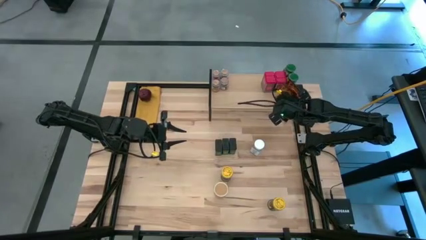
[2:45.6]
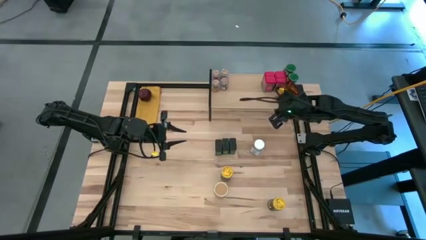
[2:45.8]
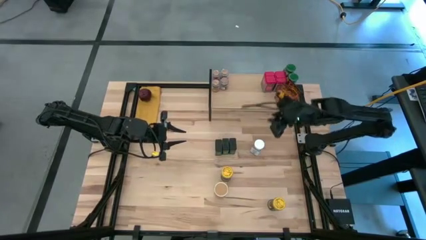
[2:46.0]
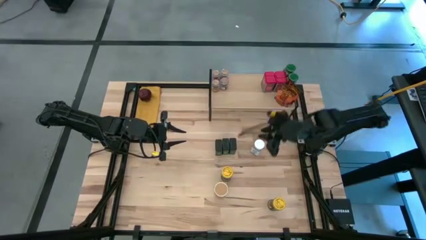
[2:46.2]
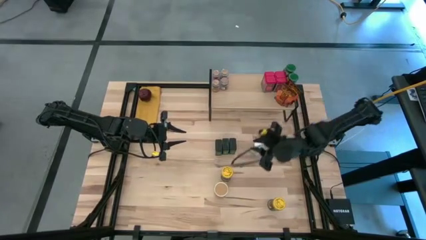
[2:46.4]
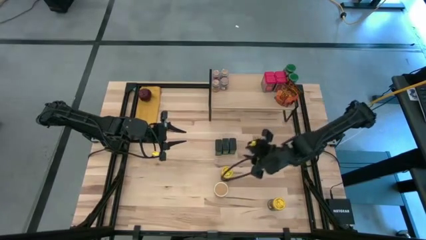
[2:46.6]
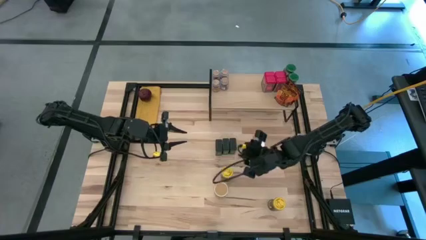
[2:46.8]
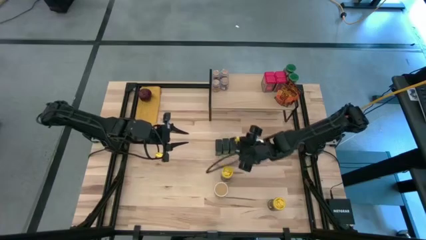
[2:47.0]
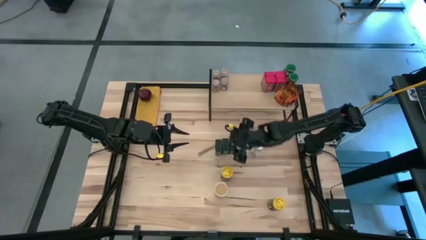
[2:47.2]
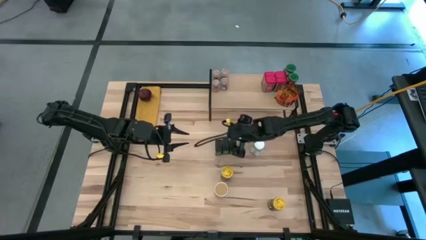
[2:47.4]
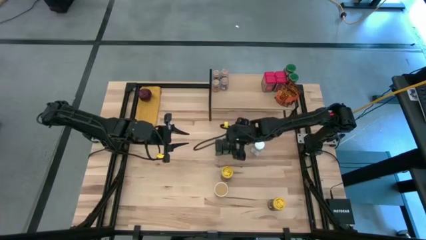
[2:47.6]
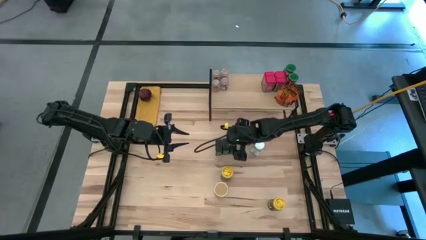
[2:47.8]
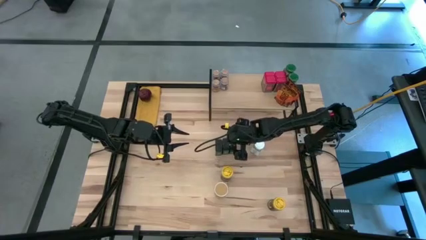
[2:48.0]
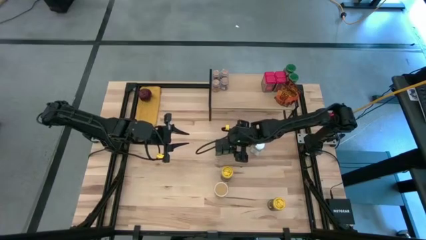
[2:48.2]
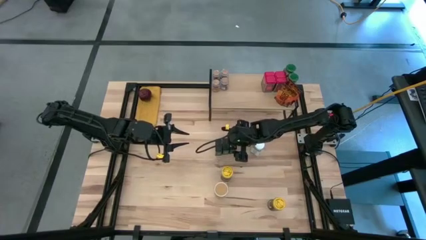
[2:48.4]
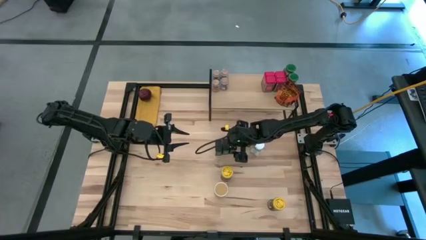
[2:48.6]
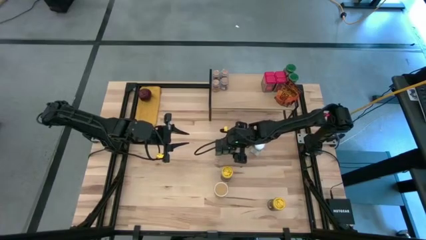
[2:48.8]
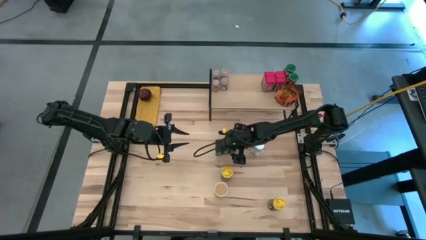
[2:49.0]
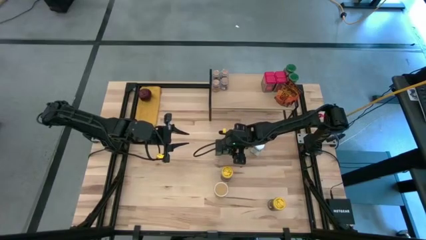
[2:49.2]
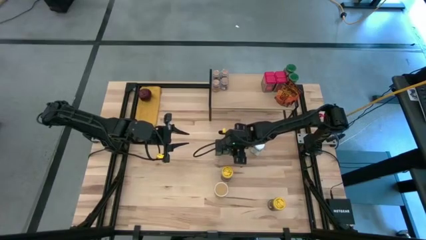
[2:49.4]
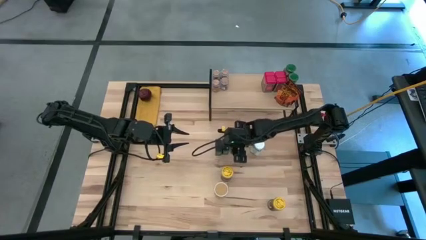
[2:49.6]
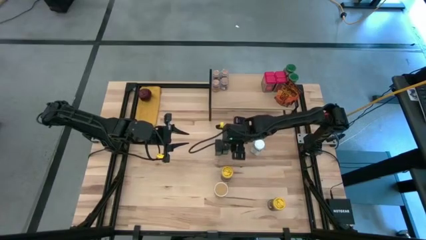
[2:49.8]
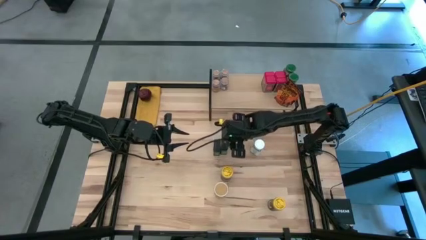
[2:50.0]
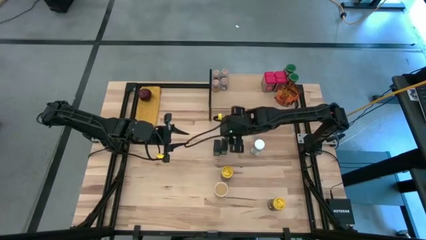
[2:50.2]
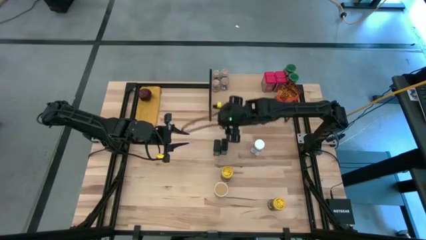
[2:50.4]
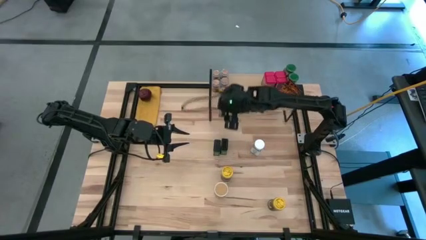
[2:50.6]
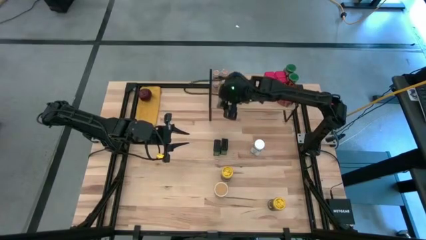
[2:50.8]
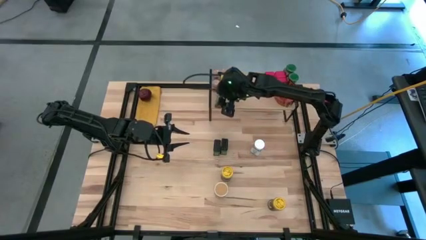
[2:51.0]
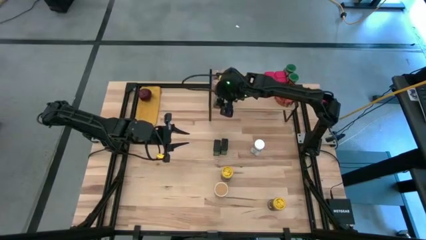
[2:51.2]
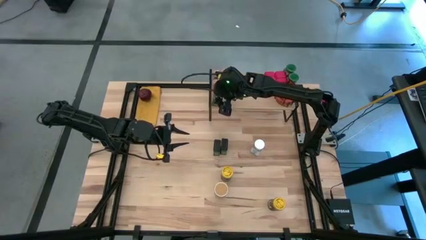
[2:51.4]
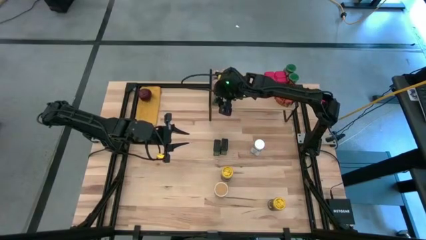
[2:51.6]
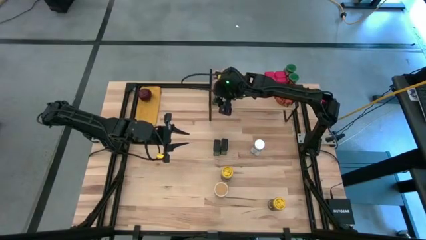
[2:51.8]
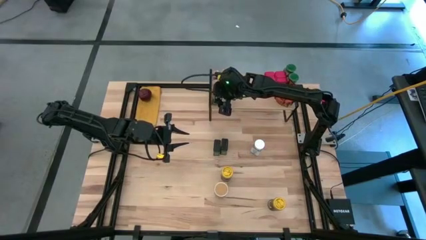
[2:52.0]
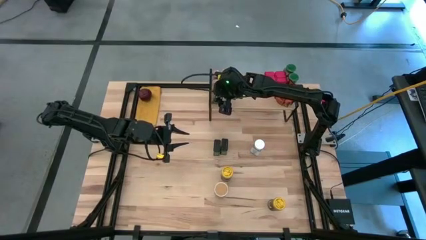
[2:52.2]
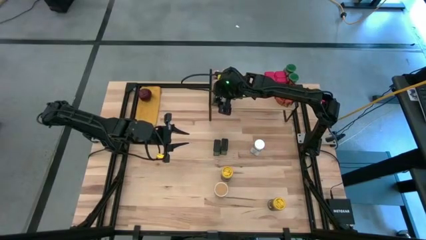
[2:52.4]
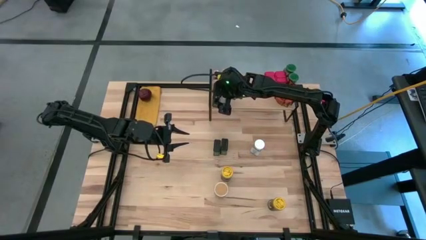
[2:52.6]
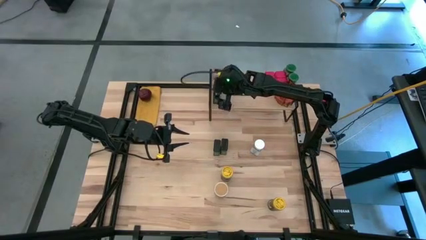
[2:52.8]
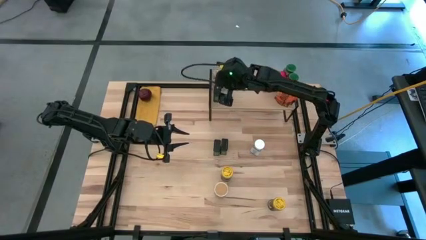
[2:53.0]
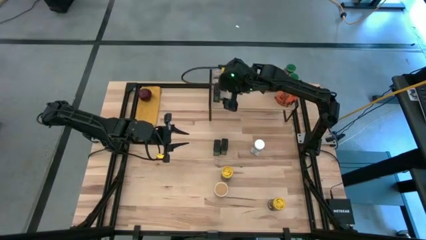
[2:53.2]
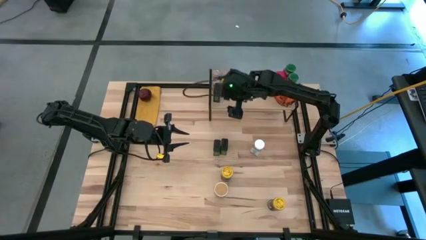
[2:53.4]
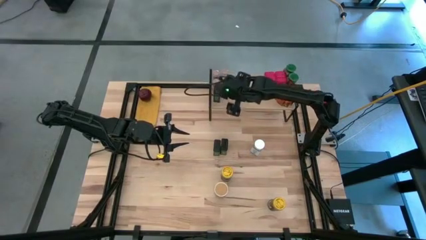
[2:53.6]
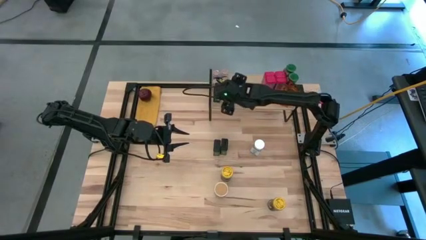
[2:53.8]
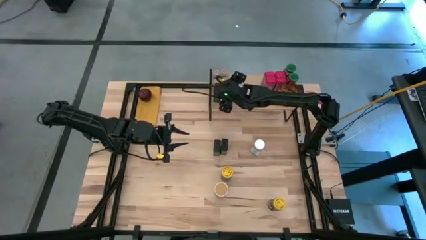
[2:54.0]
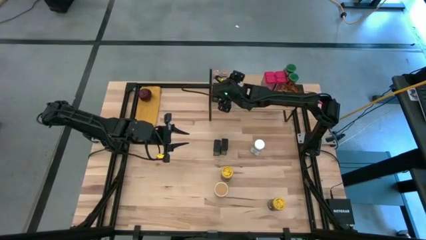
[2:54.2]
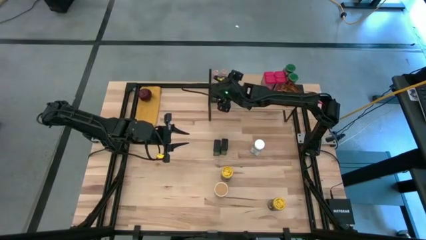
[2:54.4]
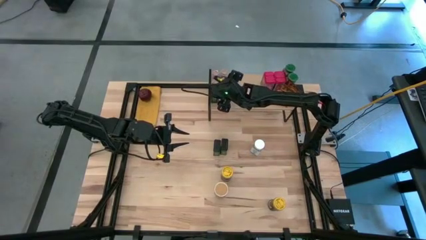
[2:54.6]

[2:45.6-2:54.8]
Task: Shelf spices
Put the right black seasoning can on the shelf

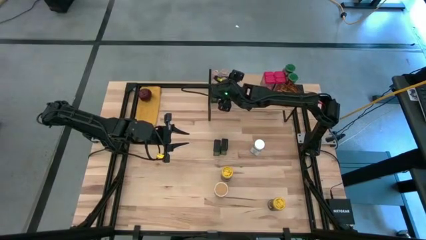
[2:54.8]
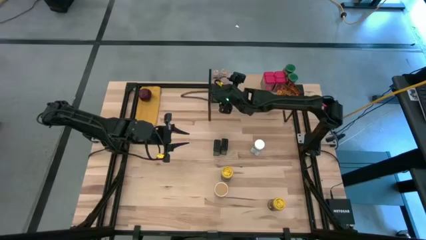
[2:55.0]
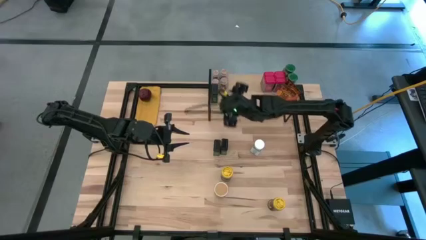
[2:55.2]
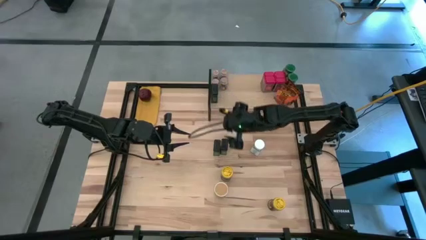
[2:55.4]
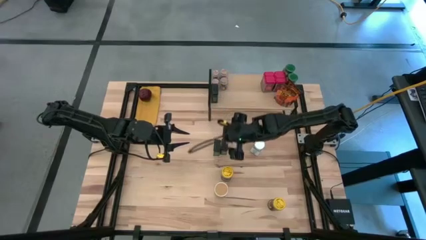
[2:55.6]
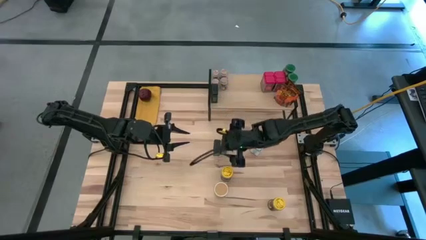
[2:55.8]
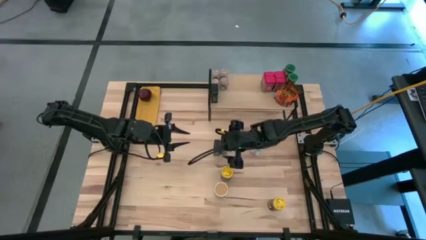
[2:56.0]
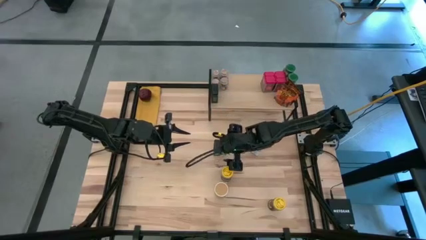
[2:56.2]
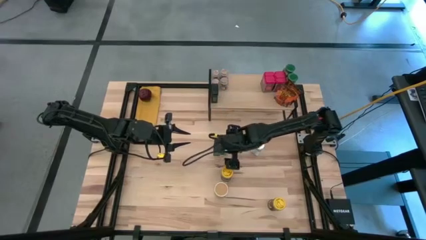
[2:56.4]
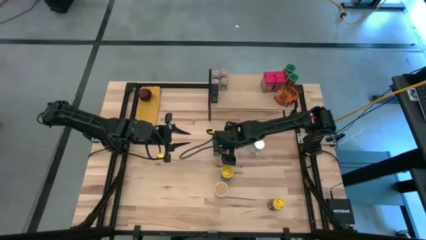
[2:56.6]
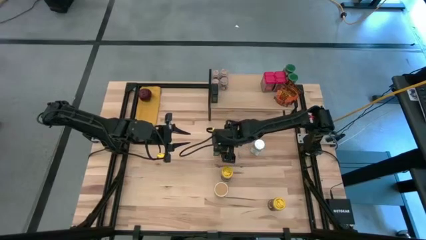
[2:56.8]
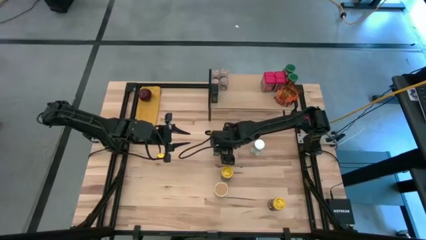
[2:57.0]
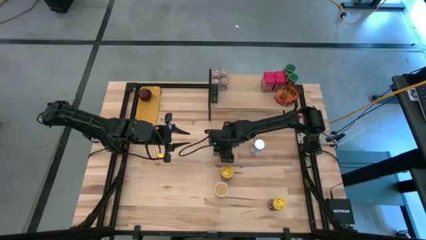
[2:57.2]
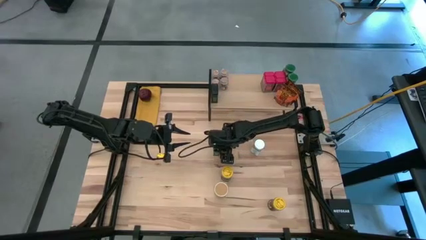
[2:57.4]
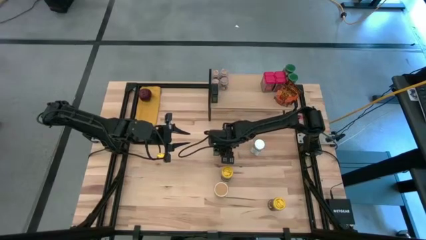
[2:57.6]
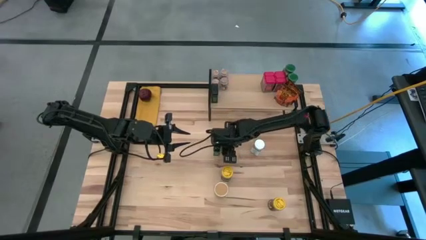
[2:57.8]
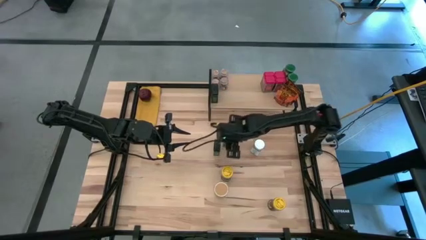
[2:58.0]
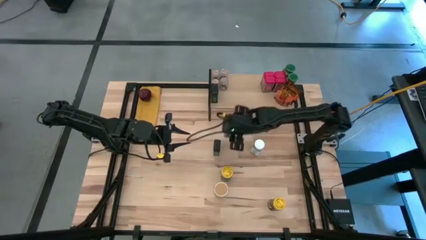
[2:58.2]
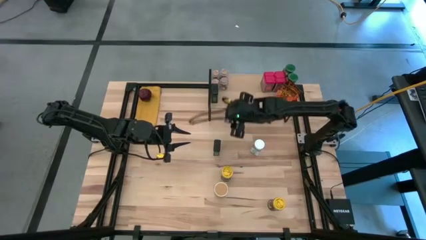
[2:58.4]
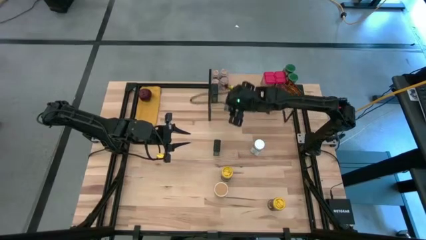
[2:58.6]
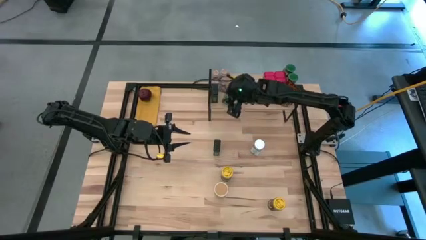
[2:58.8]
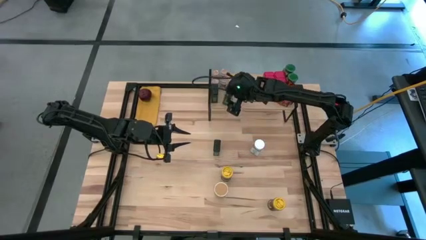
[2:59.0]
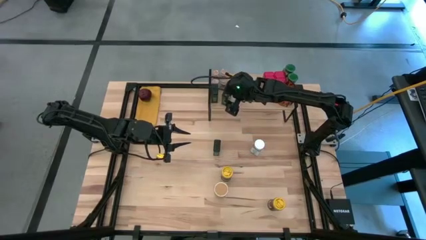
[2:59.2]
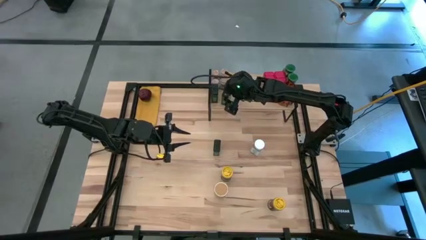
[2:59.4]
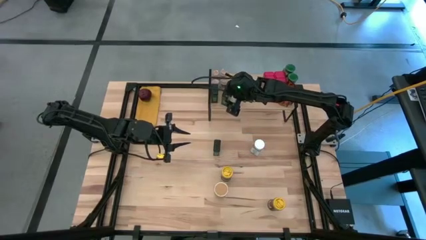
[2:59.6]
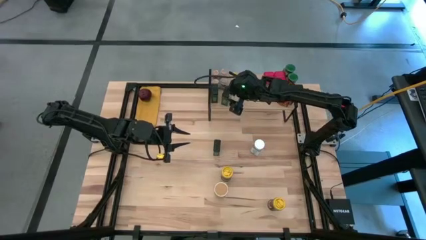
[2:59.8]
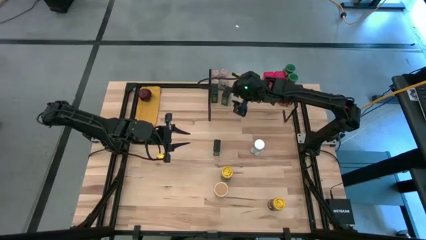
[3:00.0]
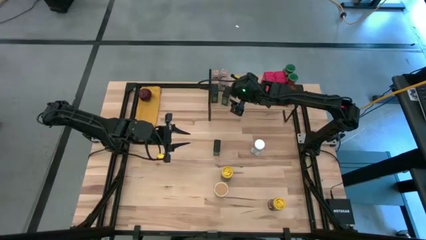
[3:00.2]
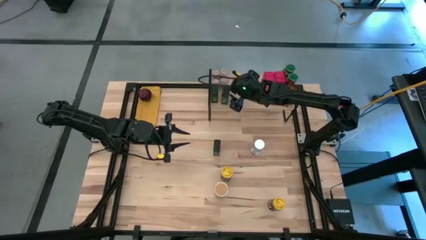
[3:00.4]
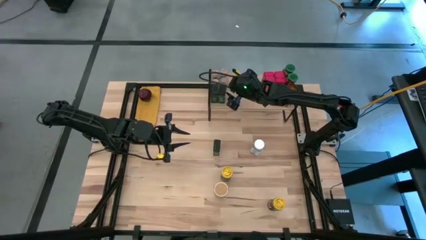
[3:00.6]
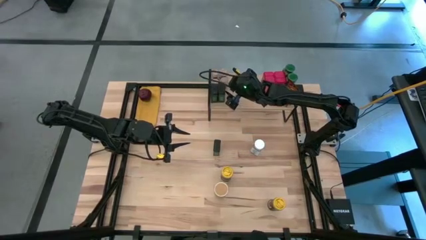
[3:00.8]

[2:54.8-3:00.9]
Put the right black seasoning can on the shelf and align it with the other black seasoning can
